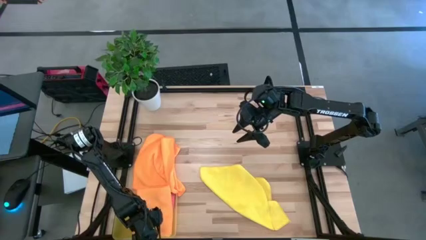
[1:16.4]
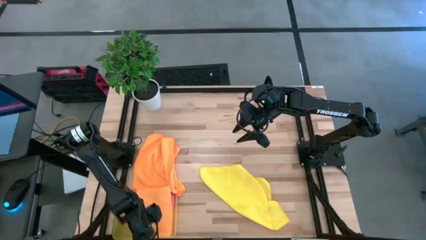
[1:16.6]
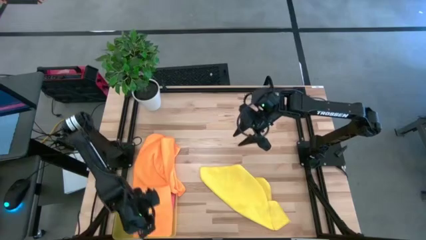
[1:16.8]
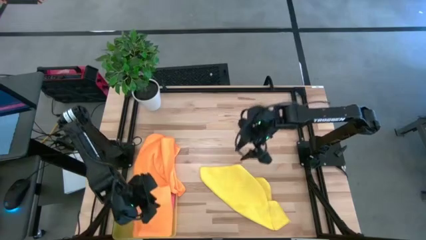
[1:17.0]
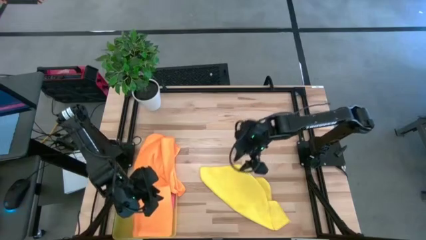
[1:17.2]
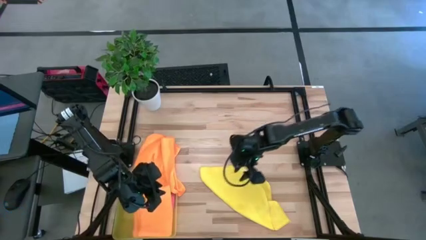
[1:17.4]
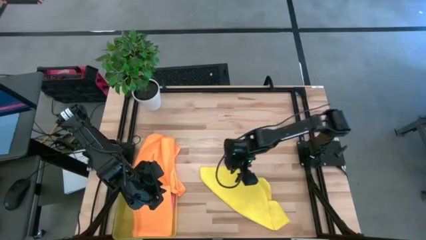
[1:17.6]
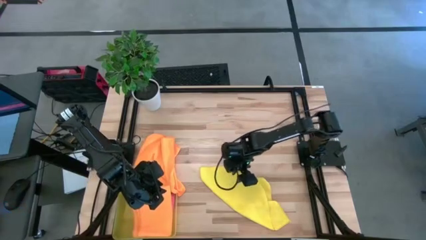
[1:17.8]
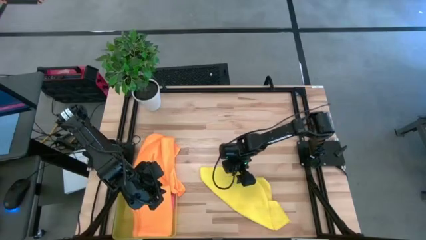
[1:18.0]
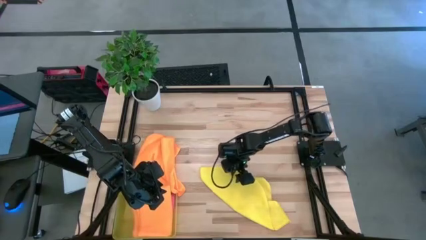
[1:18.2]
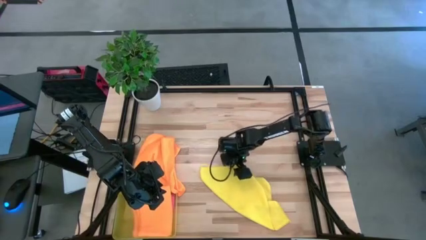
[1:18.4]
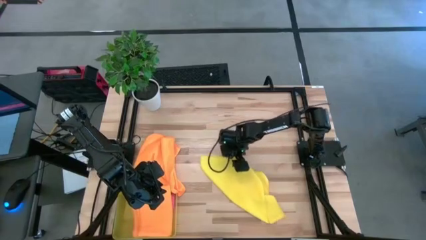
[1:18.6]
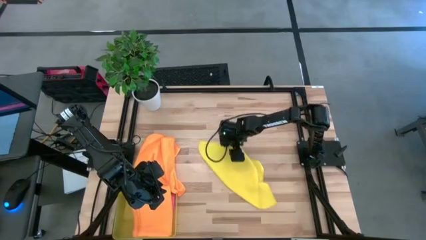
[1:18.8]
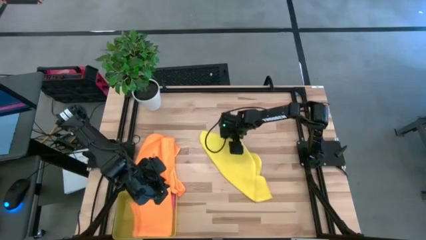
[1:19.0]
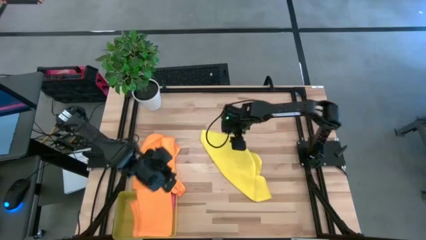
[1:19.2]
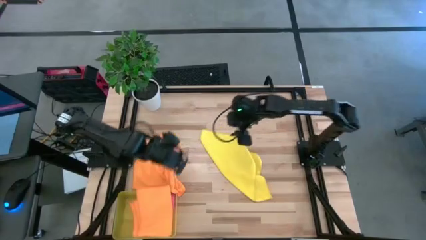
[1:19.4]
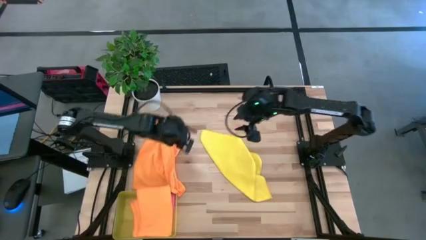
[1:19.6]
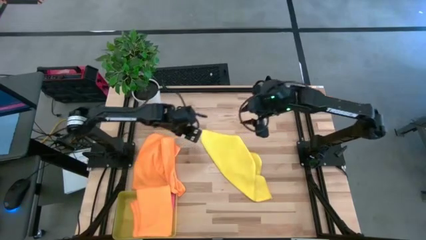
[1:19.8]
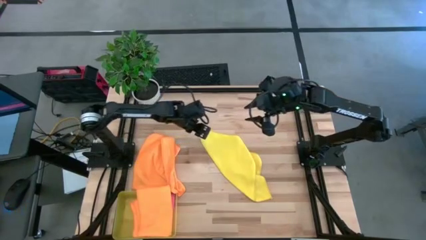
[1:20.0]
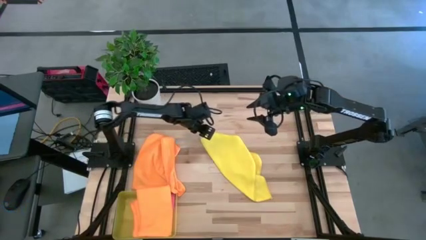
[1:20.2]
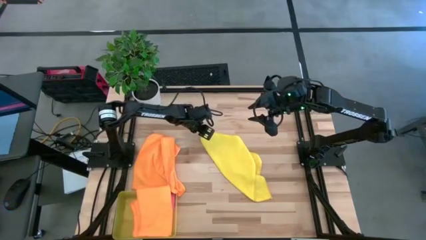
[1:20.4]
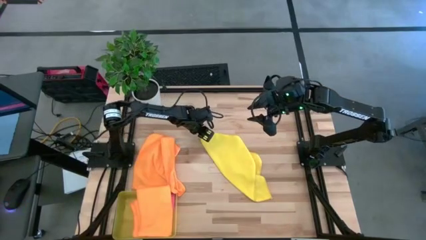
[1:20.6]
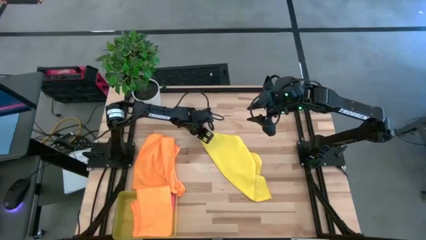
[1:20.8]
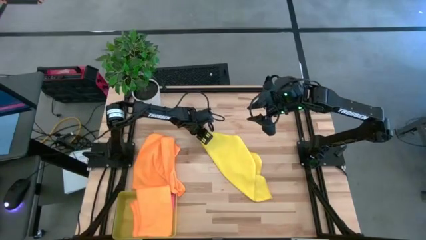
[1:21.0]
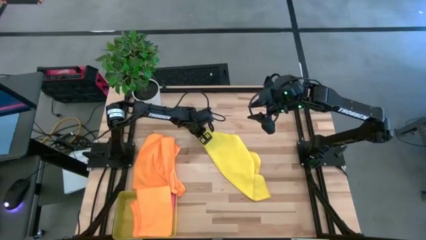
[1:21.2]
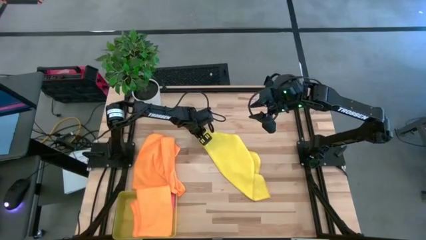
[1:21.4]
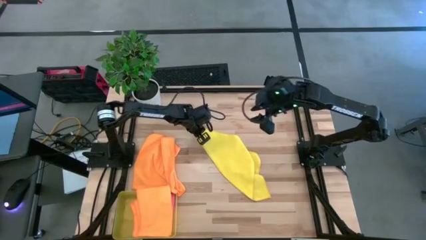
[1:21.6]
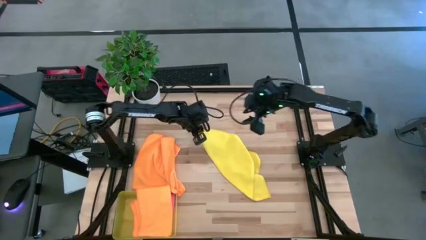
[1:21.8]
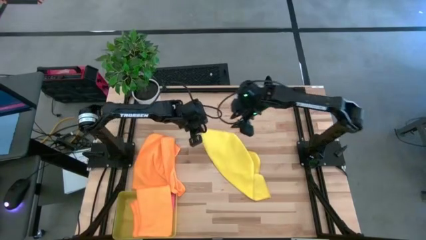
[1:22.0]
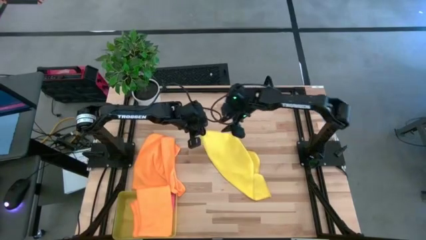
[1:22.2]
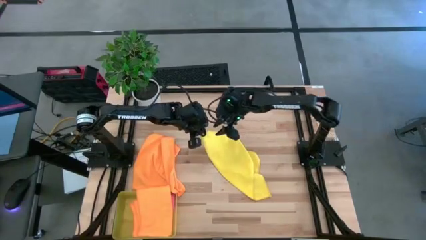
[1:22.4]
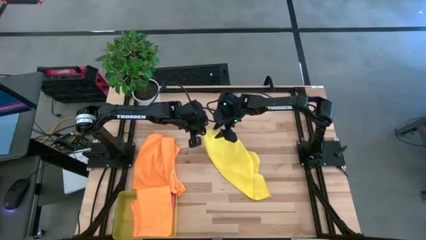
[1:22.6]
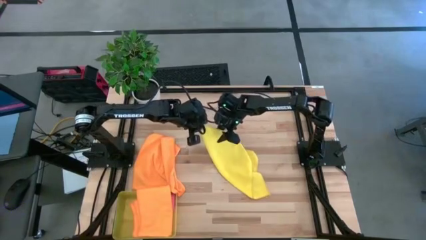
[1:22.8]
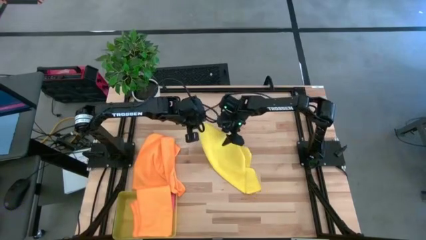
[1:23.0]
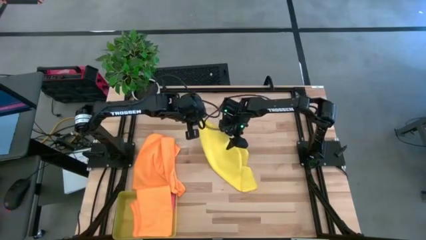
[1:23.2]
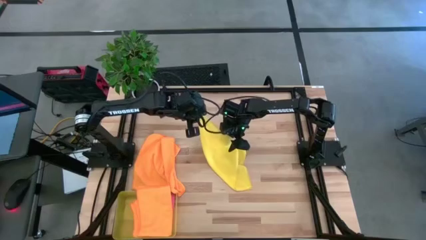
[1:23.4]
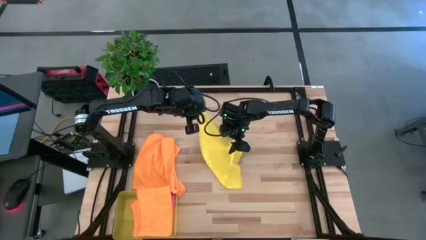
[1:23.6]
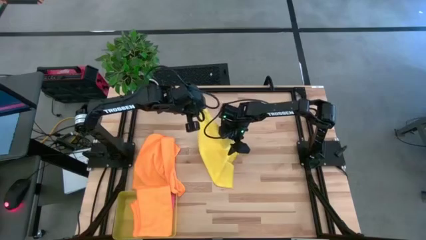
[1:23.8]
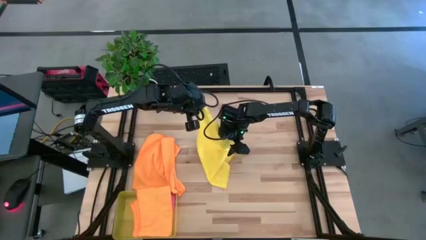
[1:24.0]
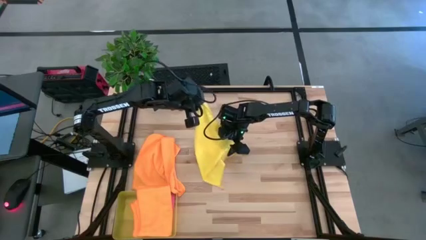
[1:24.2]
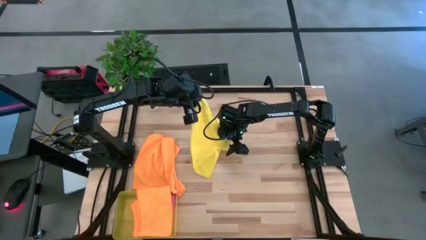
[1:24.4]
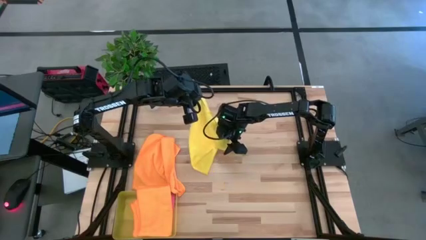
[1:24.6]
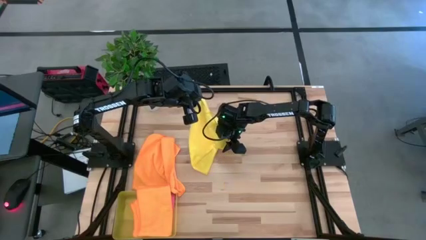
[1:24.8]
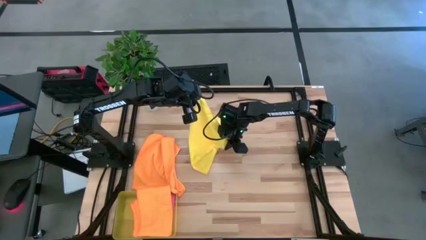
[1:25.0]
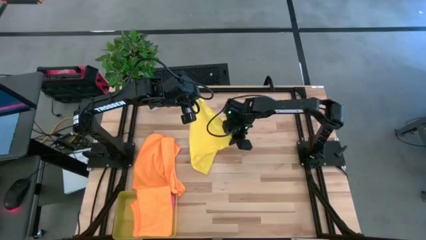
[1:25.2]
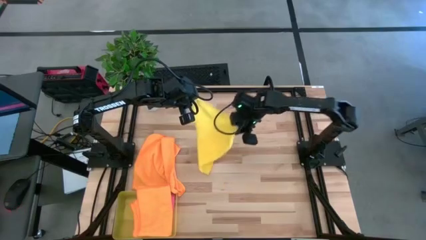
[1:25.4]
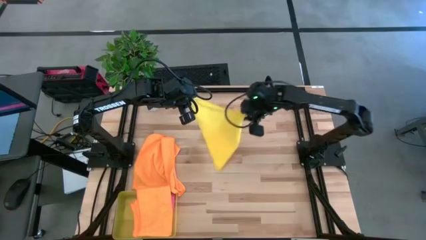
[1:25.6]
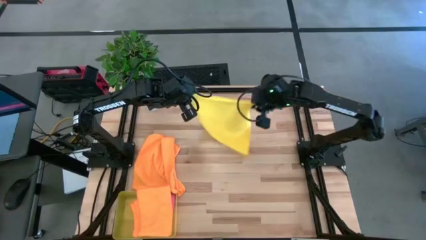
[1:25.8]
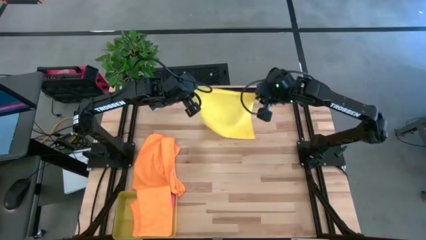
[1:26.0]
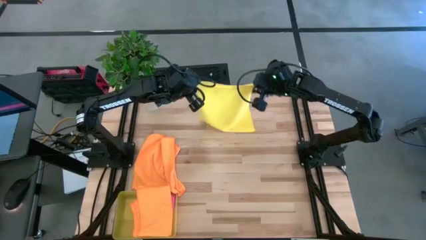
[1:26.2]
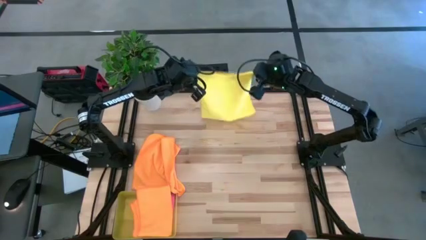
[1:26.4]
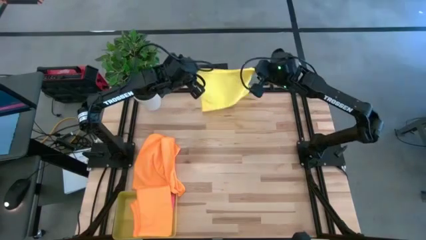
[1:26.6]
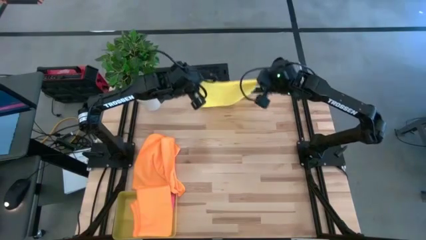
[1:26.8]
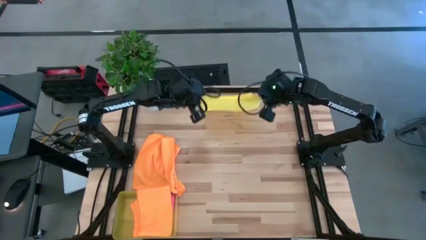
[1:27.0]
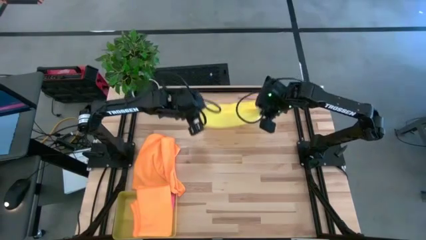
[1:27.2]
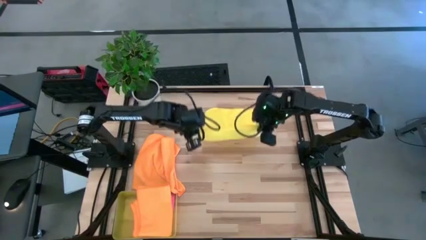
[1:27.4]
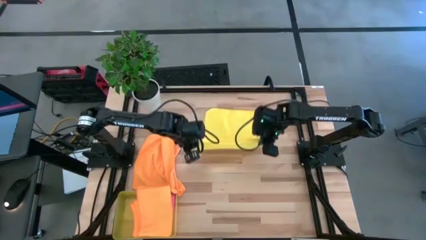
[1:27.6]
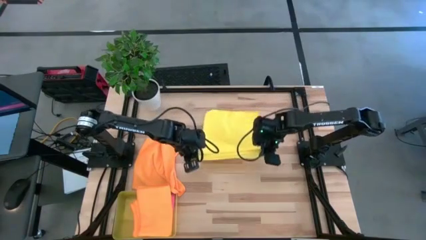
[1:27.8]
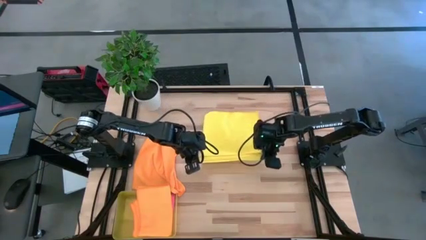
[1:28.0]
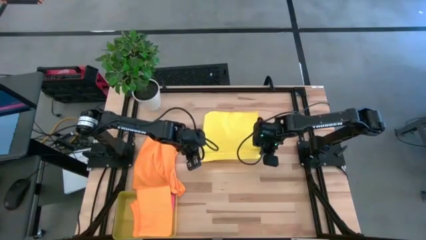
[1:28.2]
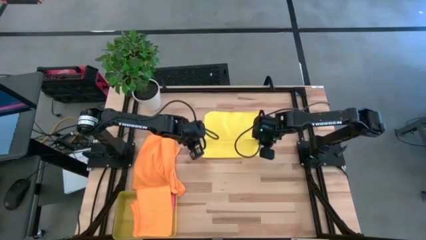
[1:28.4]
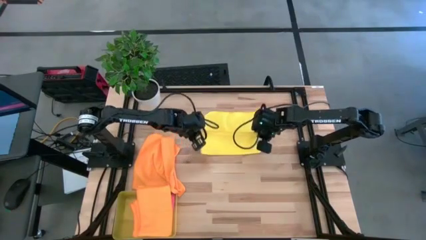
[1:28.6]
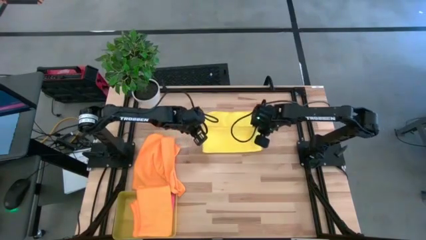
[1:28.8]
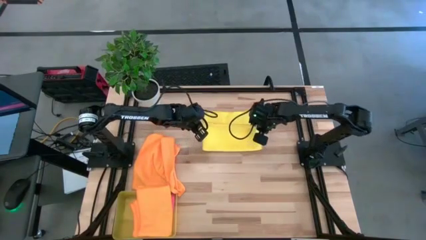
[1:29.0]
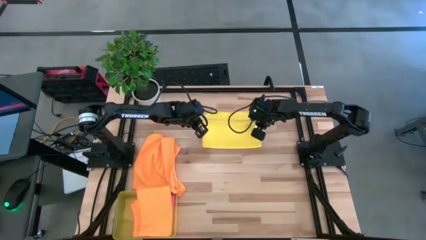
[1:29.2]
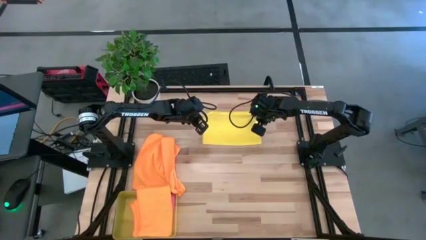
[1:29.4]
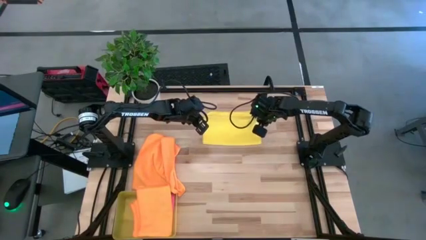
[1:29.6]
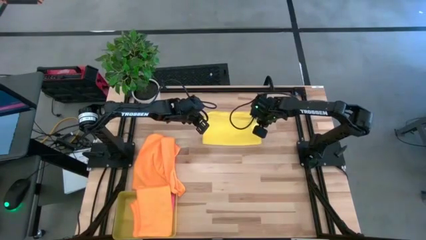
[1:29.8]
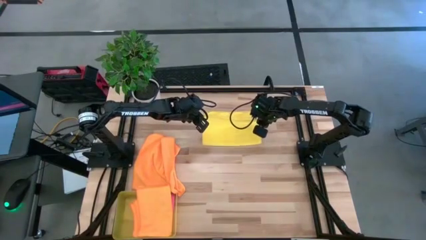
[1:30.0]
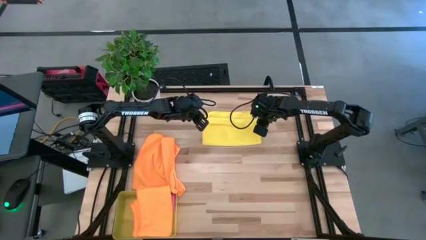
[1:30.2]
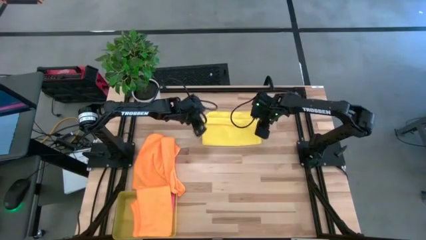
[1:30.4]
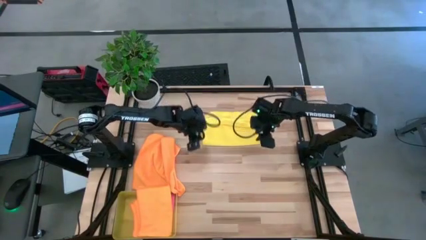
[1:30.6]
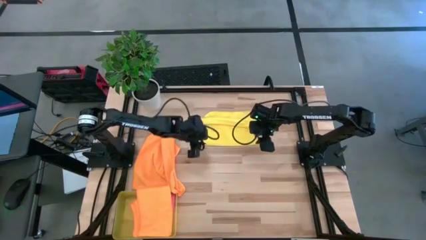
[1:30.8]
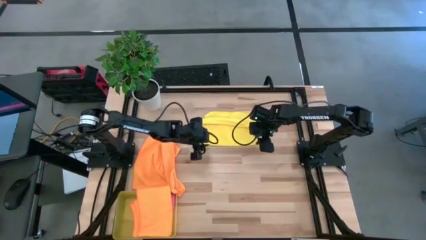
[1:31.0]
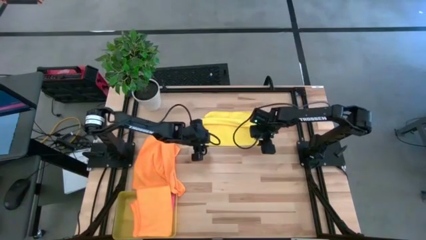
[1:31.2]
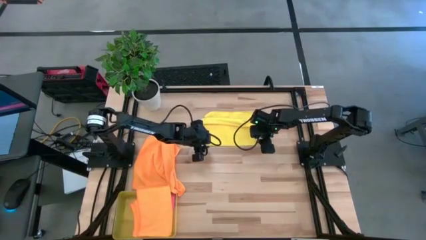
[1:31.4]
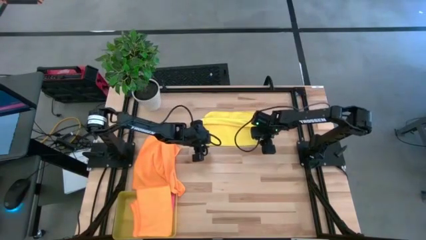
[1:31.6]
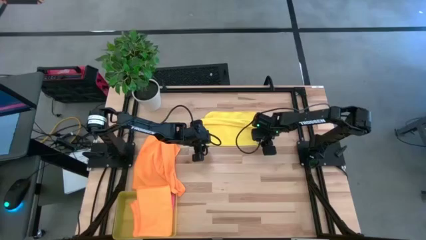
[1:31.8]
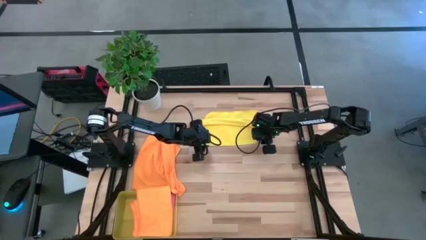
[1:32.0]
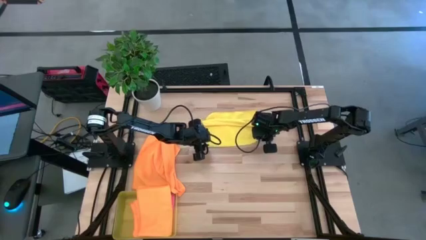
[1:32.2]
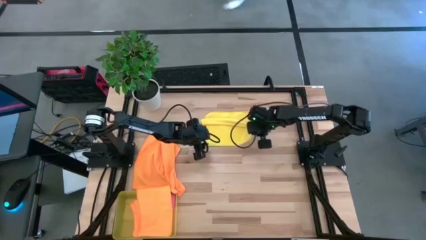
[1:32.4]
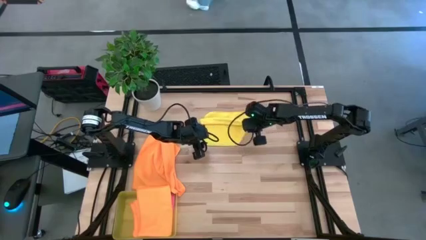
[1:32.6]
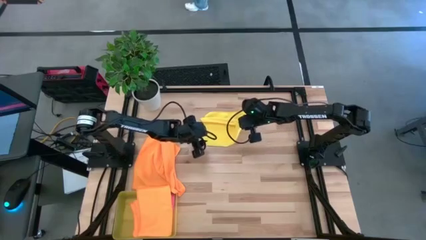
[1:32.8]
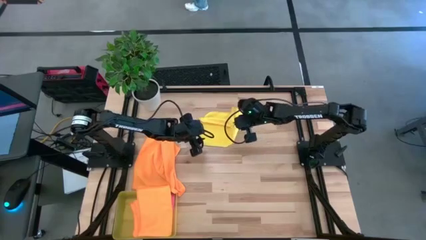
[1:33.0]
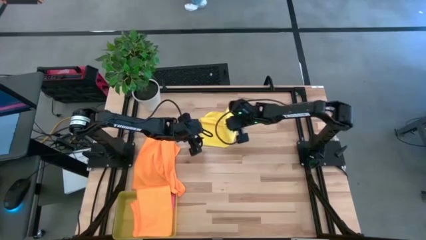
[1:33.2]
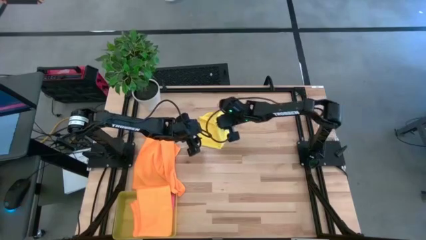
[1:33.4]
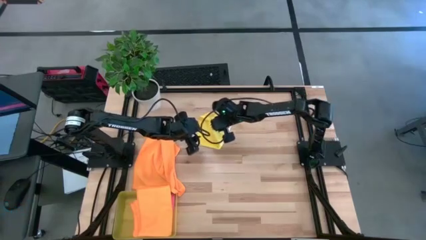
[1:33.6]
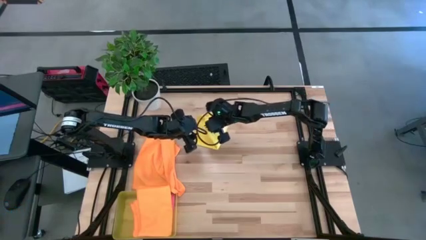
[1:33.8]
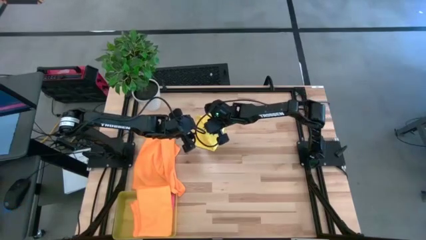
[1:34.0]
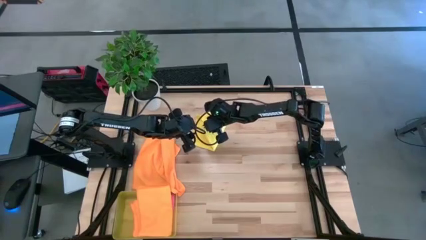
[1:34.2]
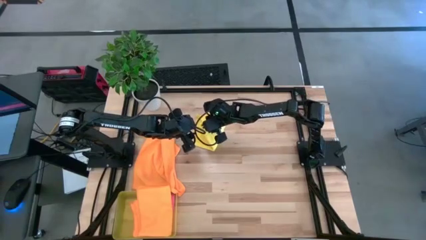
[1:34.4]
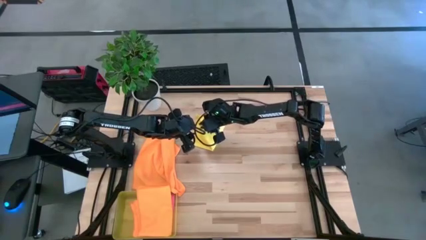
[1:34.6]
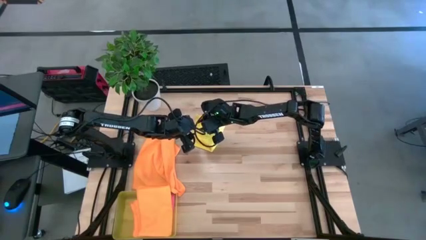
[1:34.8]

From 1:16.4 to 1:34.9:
Task: Fold microfiber towels
Fold the yellow microfiber towel
